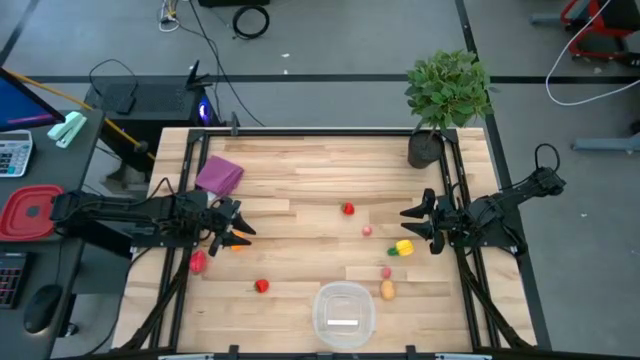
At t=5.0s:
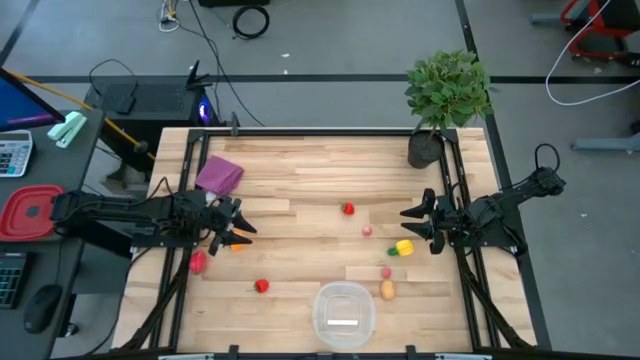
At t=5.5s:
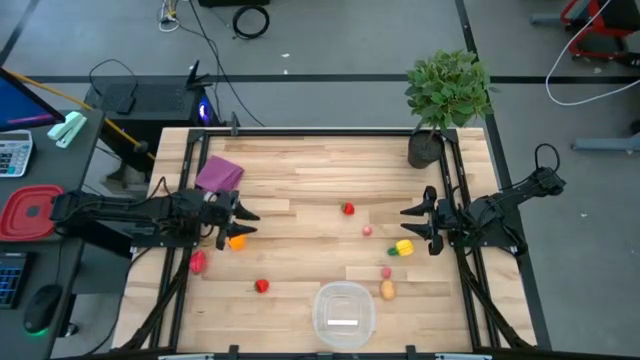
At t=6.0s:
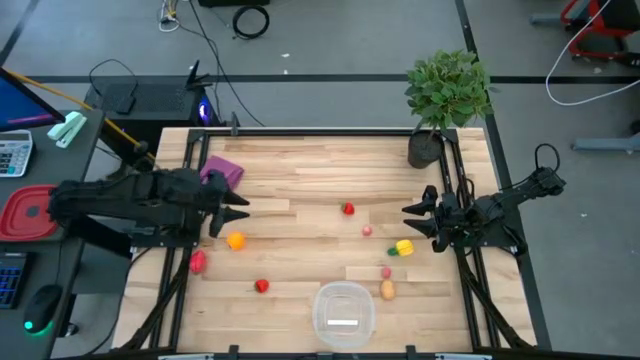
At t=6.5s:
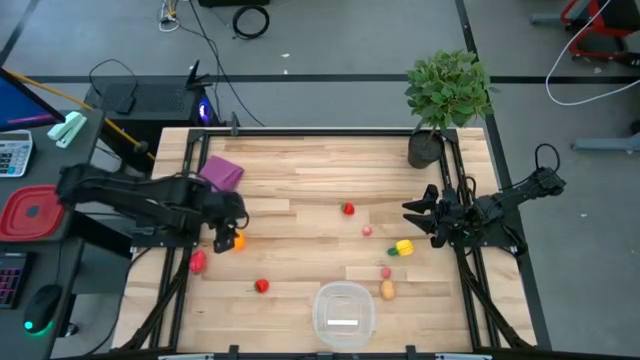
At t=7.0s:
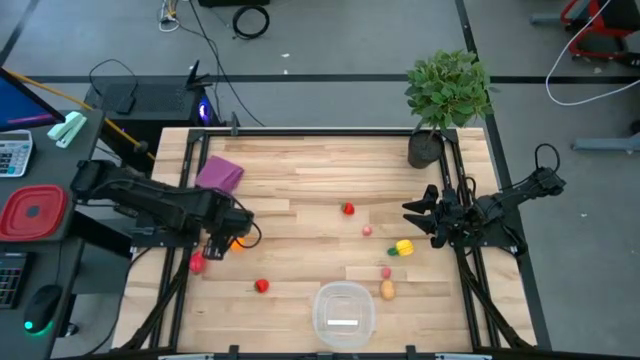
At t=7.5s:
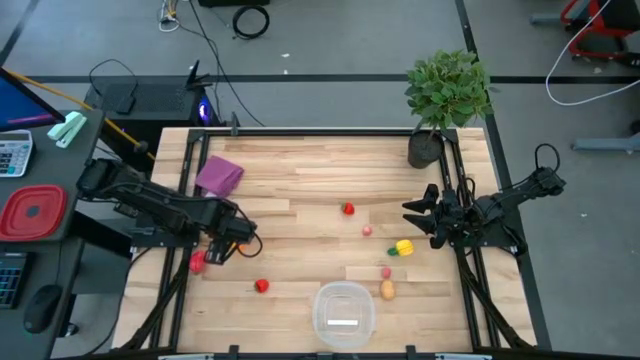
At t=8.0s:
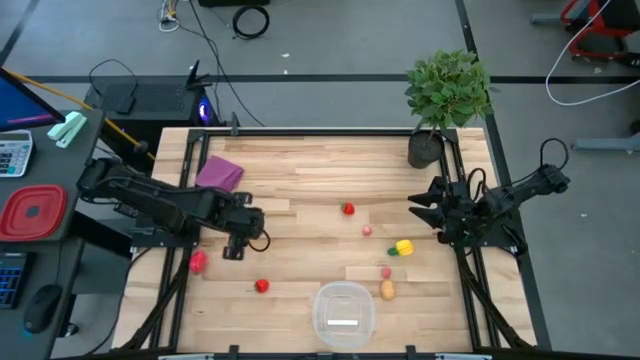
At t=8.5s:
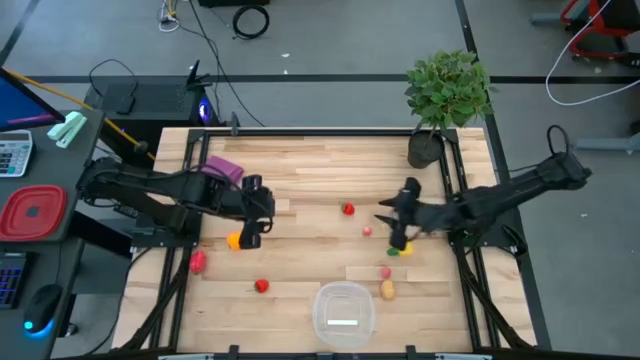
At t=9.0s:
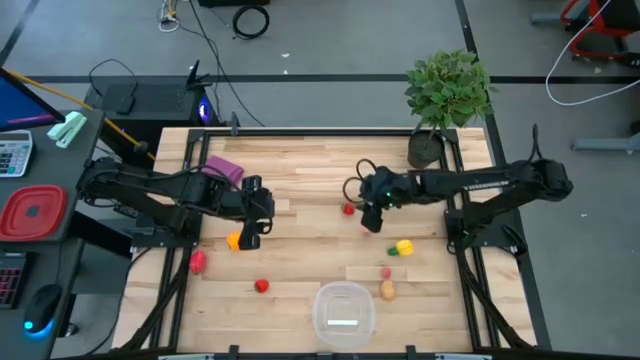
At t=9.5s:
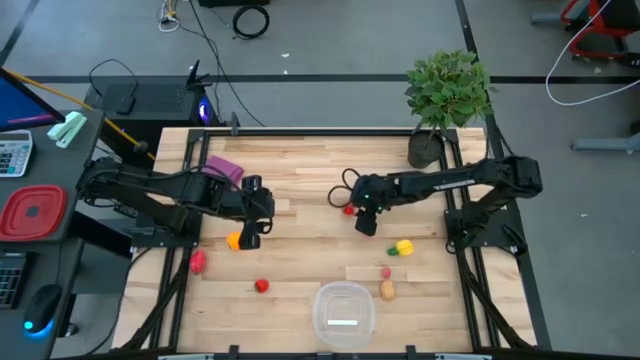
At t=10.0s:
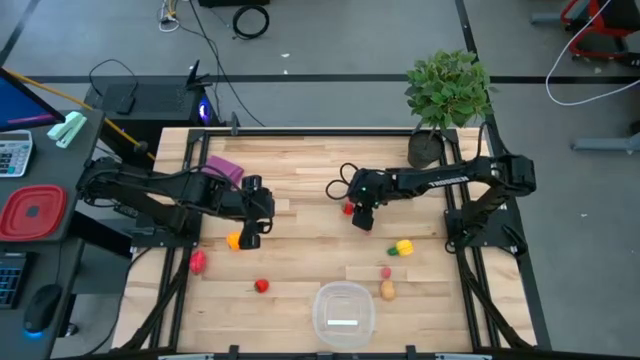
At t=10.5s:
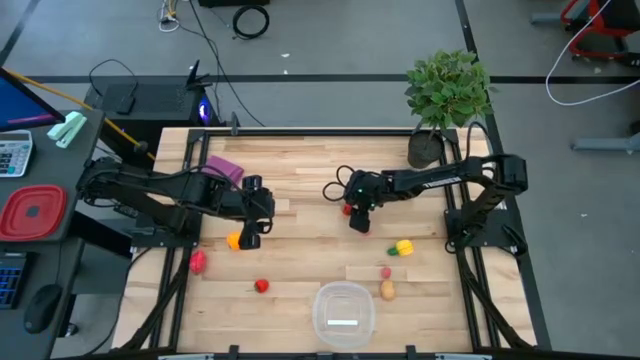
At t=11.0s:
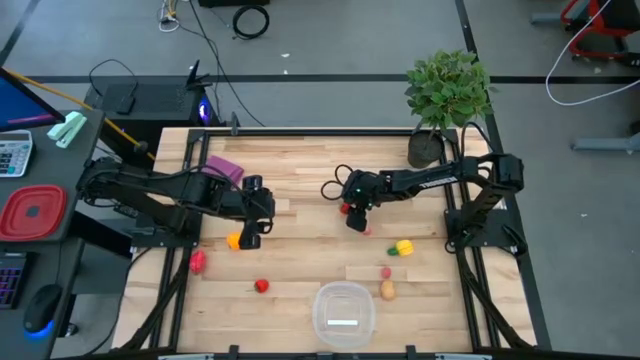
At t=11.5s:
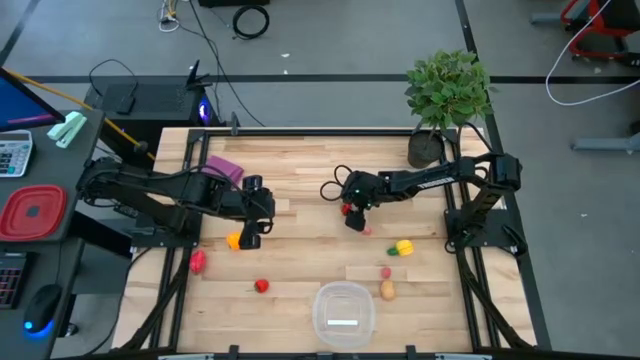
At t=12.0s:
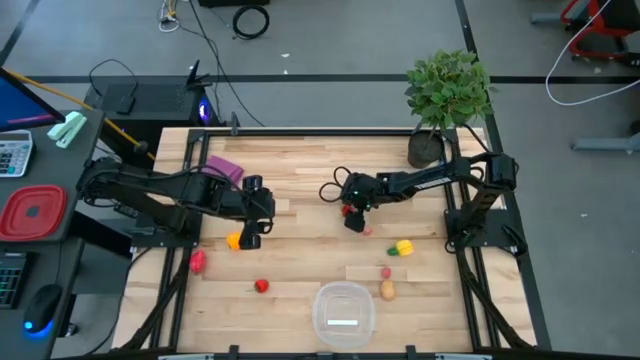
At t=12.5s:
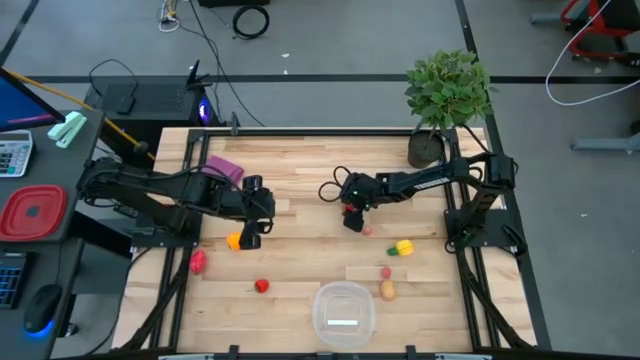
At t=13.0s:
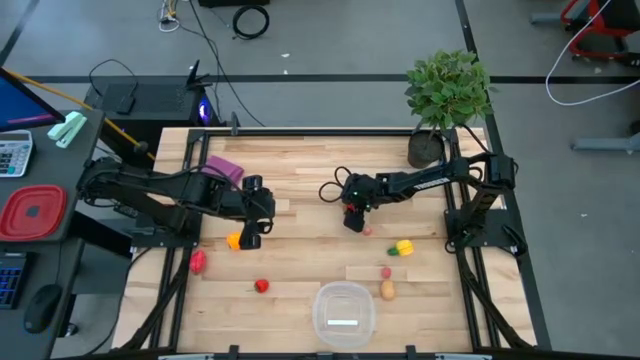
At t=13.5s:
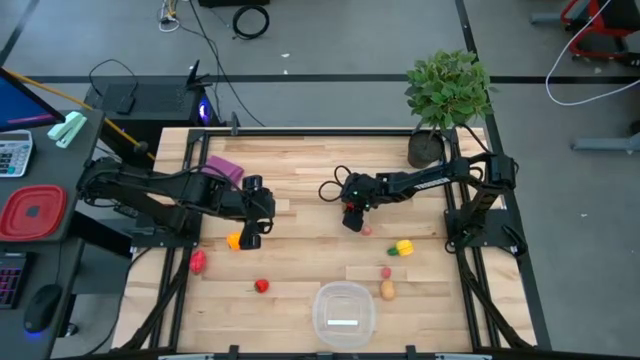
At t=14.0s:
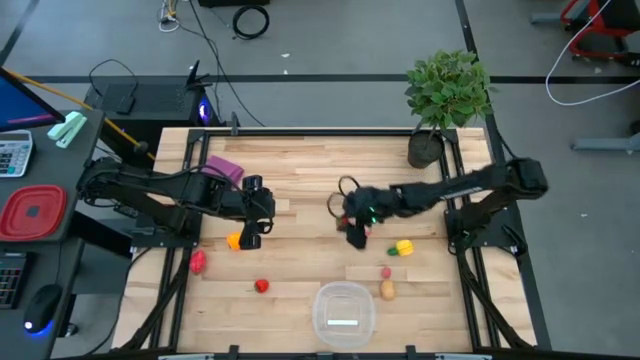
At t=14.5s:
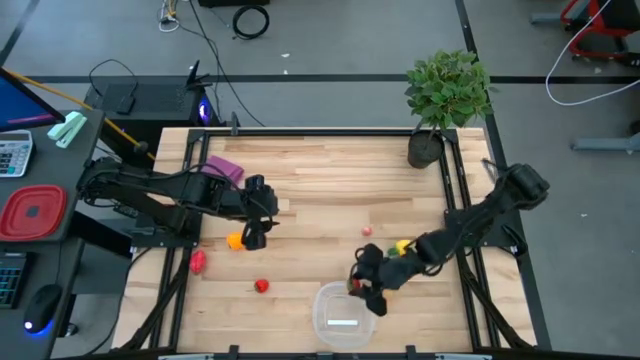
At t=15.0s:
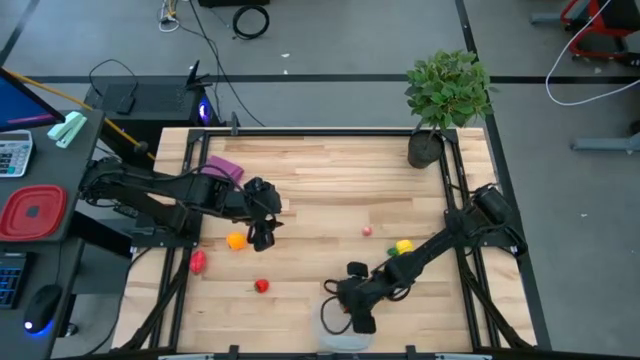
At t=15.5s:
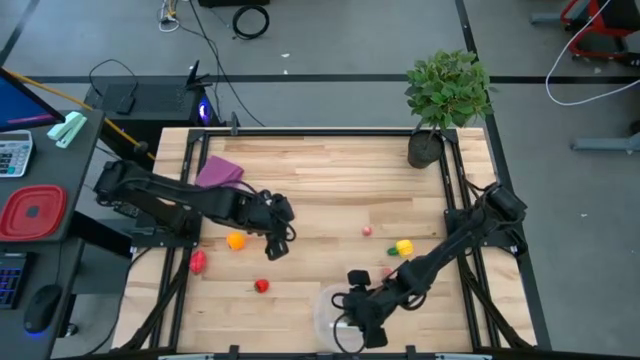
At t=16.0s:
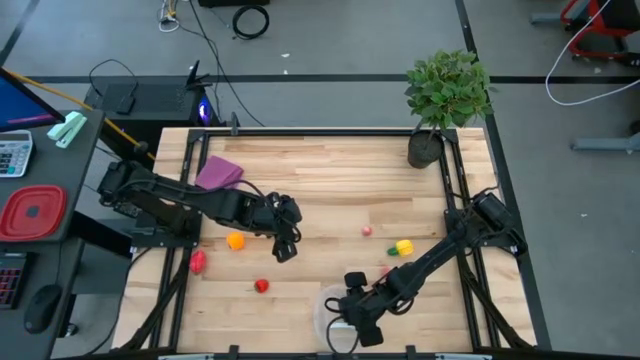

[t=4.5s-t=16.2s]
Task: Pick and placing Produce into tupperware
Put the top strawberry into the transparent bin

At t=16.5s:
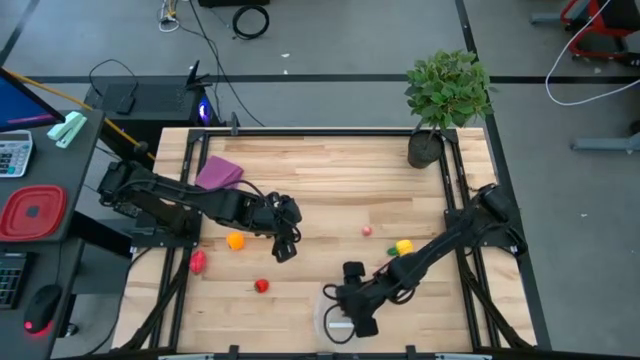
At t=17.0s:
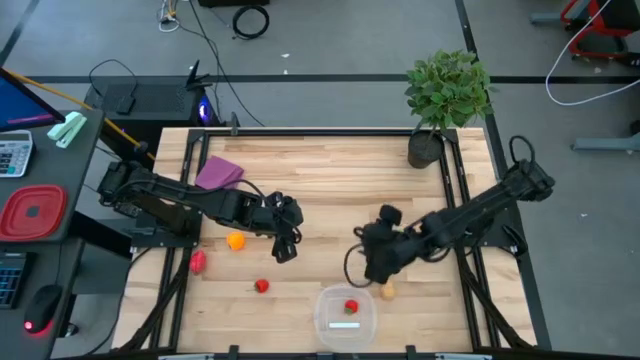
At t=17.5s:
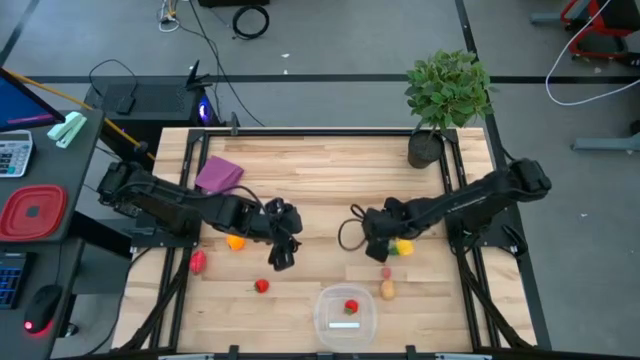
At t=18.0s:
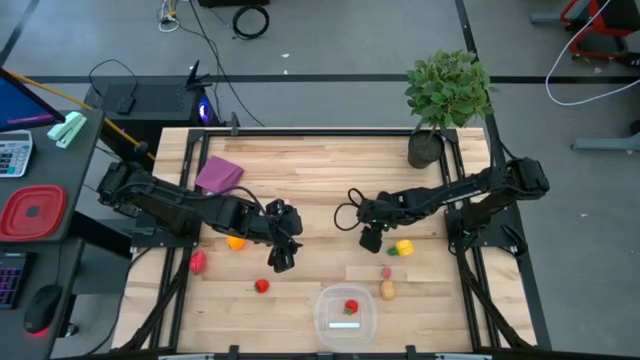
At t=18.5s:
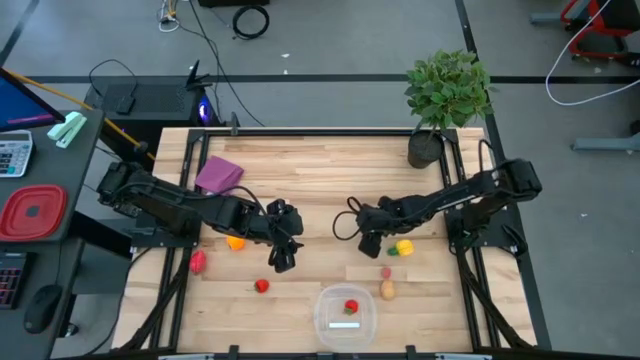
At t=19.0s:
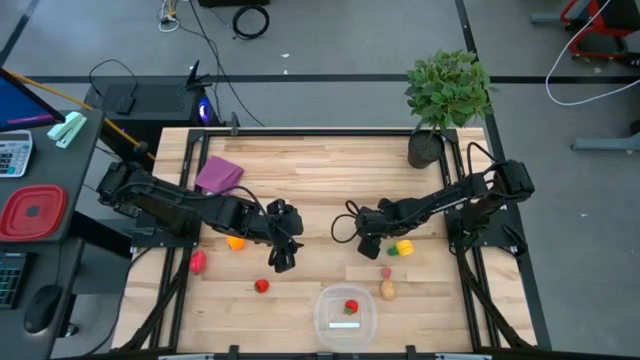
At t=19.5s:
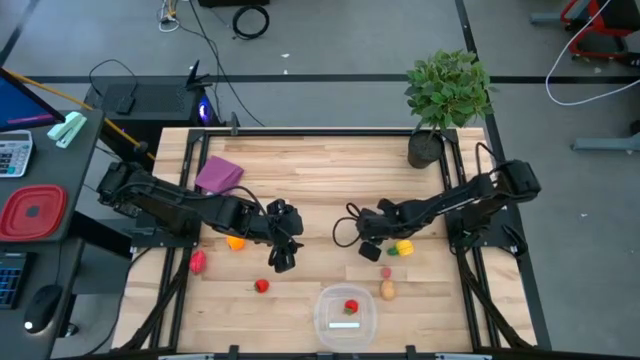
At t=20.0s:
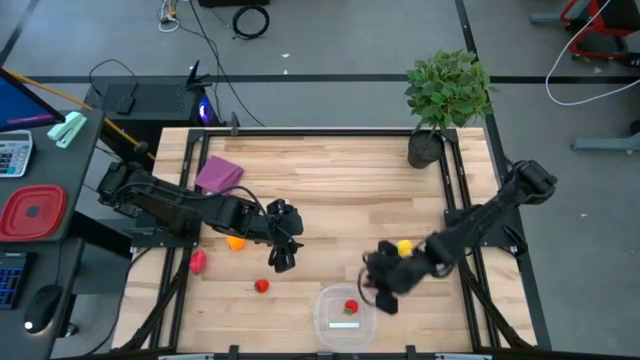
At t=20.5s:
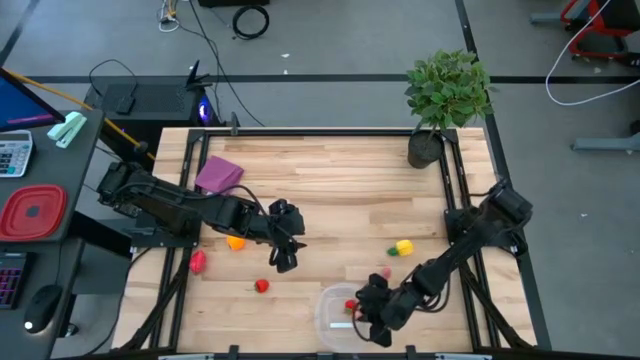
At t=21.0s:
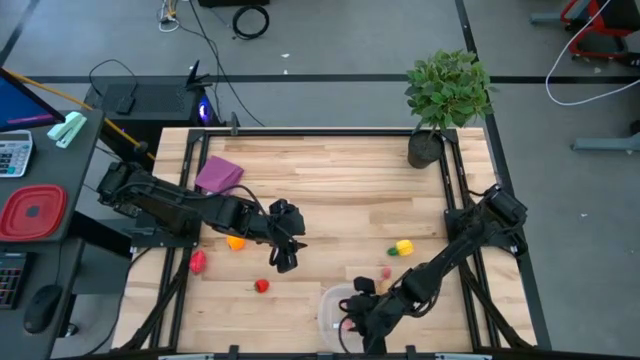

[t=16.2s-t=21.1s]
Put the top peach into the transparent bin

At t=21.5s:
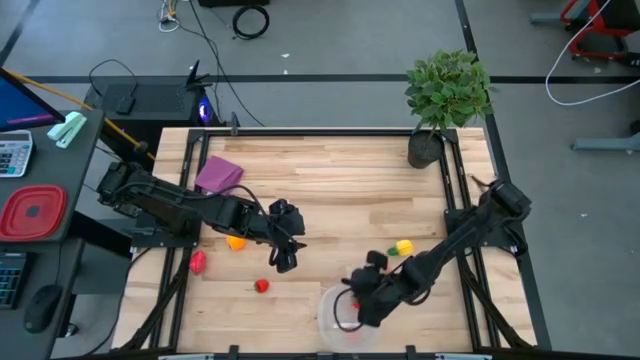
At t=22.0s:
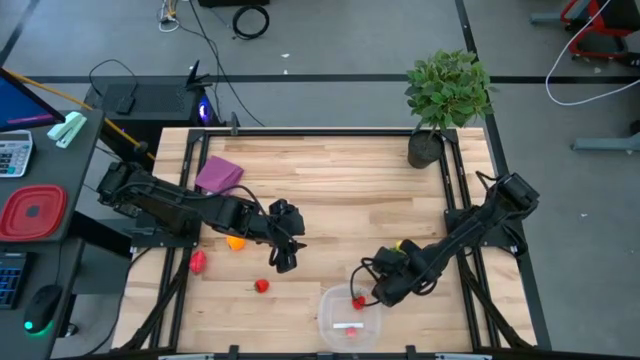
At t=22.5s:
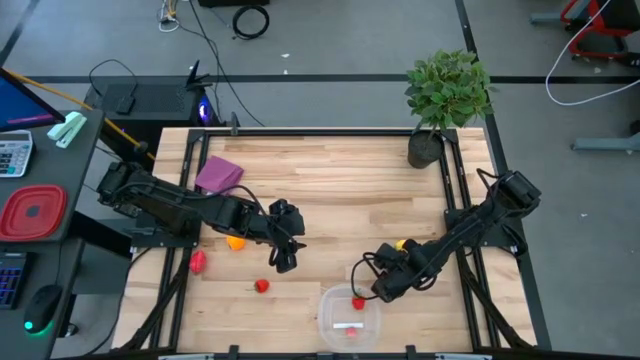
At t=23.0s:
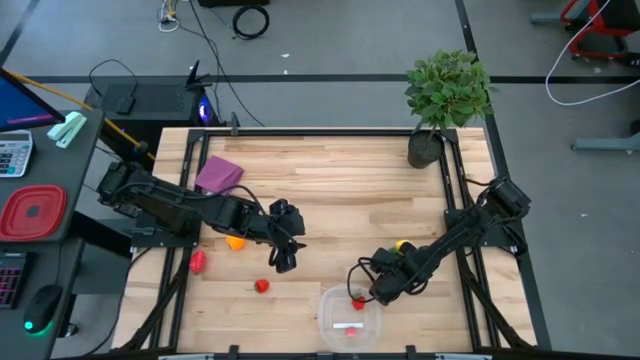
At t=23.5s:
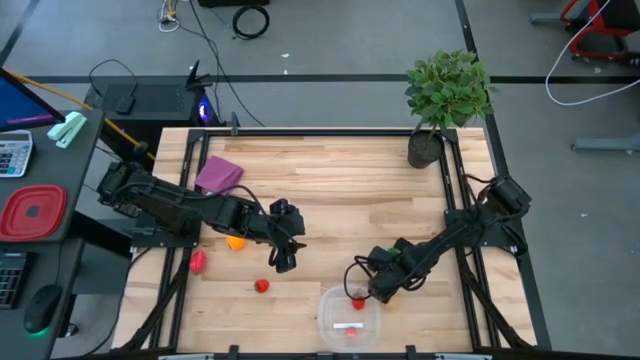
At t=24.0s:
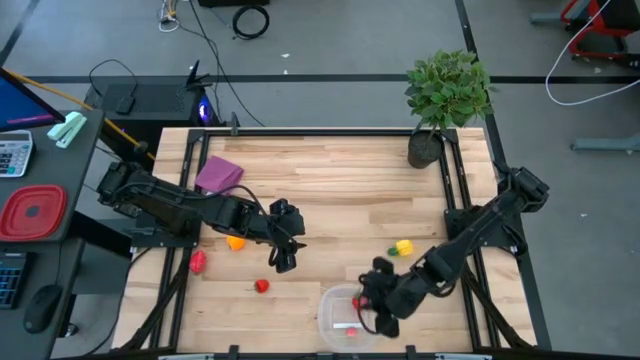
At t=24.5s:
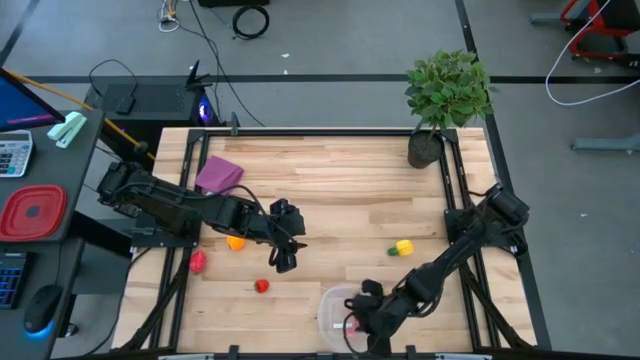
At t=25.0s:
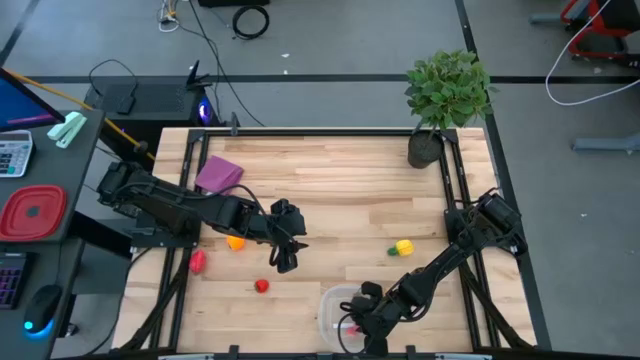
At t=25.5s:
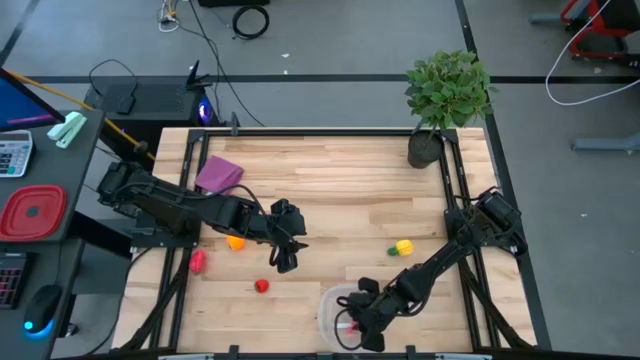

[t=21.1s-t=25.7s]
Put the peach into the transparent bin
